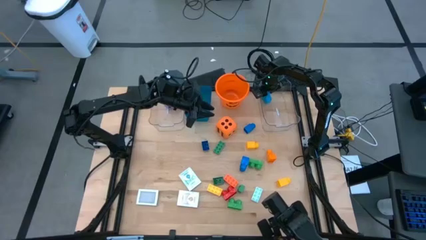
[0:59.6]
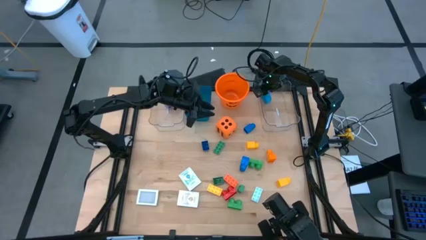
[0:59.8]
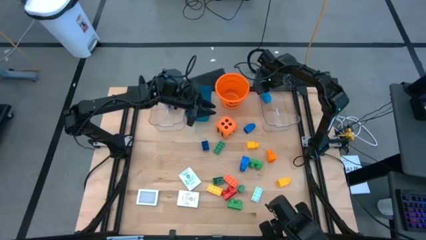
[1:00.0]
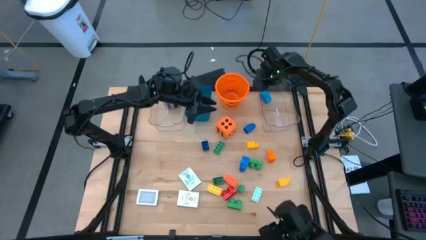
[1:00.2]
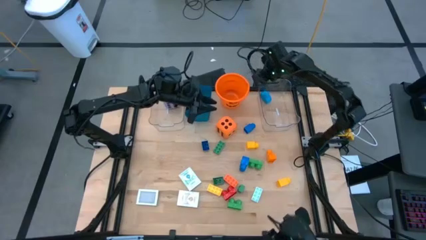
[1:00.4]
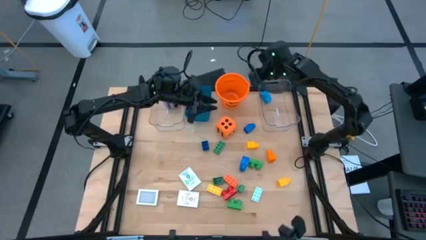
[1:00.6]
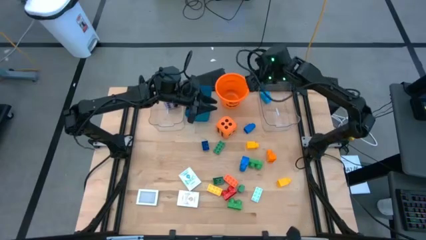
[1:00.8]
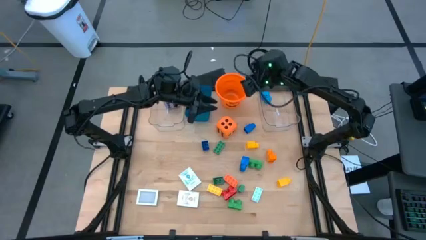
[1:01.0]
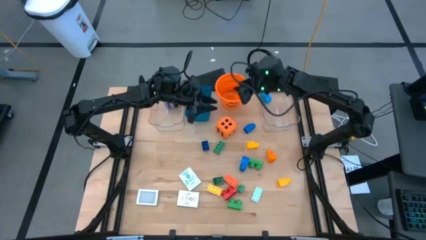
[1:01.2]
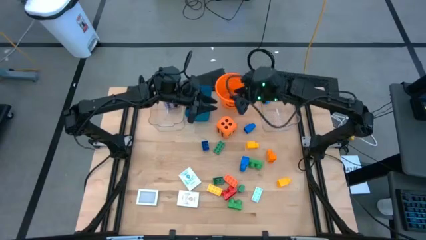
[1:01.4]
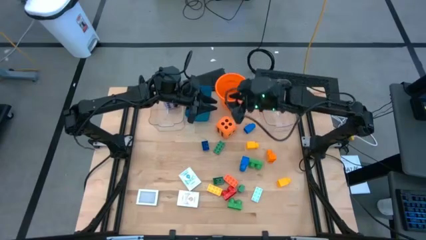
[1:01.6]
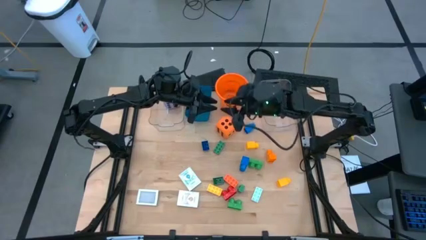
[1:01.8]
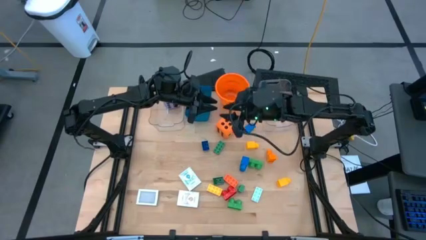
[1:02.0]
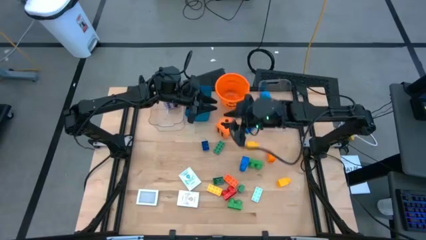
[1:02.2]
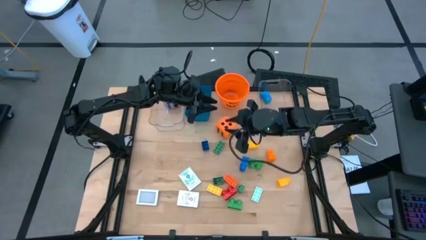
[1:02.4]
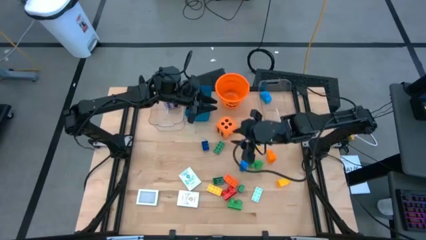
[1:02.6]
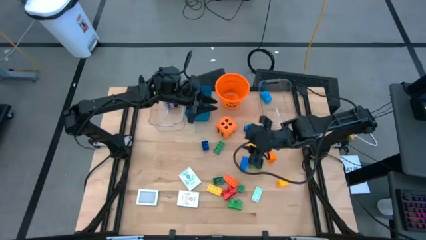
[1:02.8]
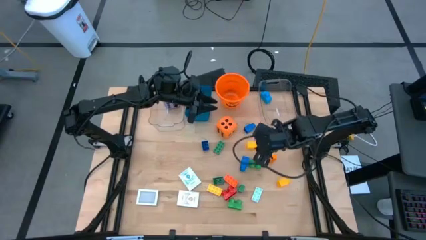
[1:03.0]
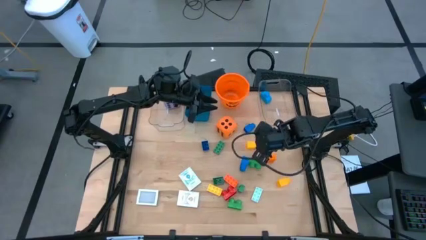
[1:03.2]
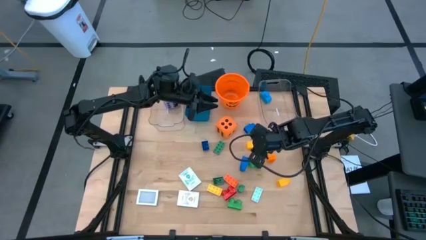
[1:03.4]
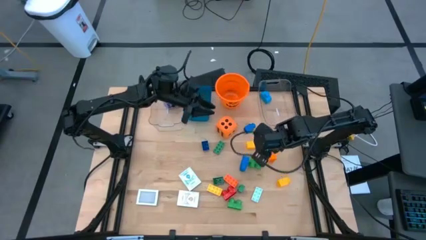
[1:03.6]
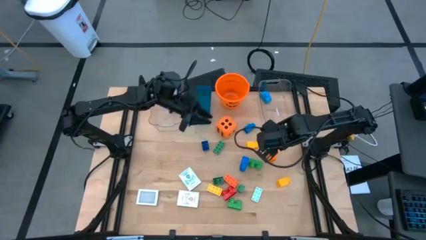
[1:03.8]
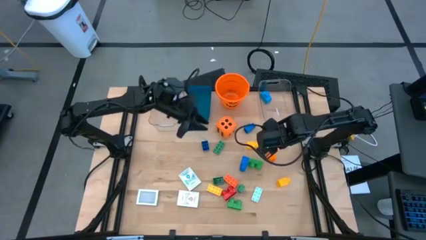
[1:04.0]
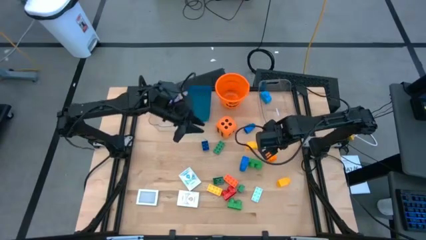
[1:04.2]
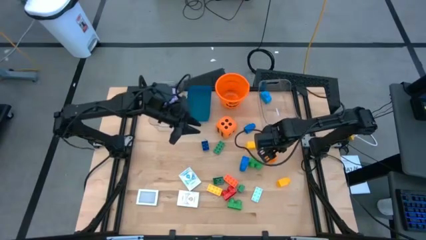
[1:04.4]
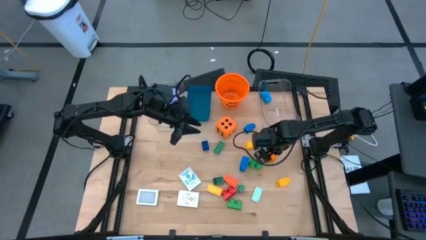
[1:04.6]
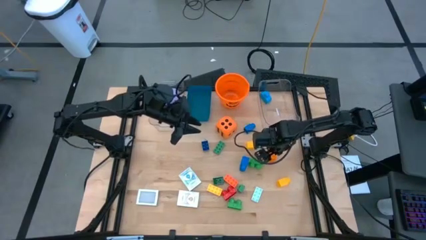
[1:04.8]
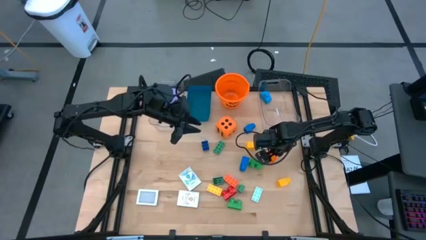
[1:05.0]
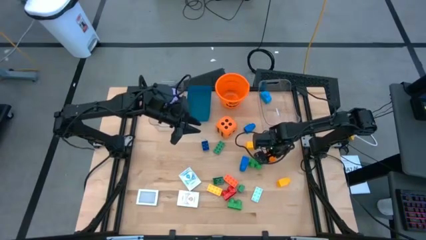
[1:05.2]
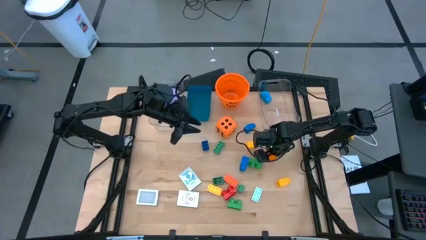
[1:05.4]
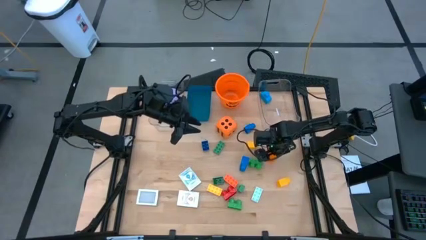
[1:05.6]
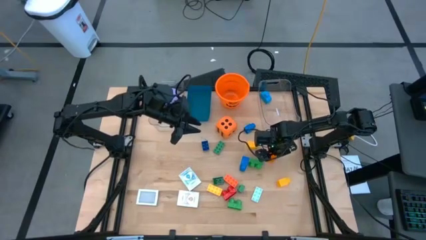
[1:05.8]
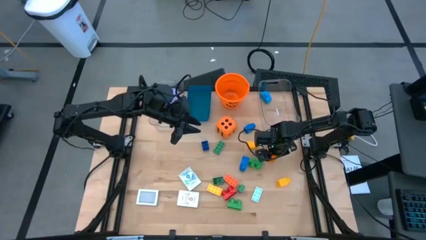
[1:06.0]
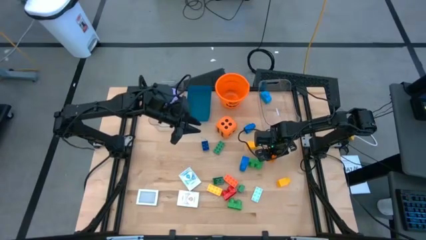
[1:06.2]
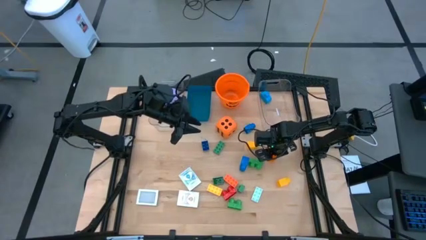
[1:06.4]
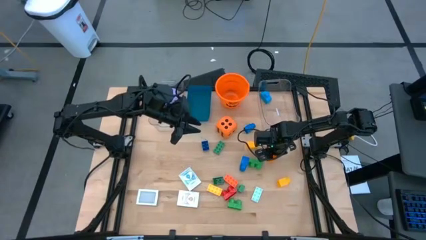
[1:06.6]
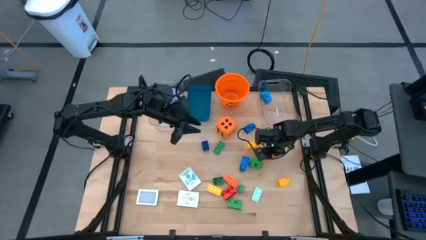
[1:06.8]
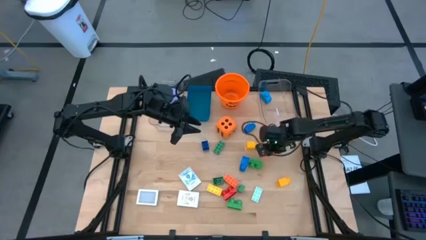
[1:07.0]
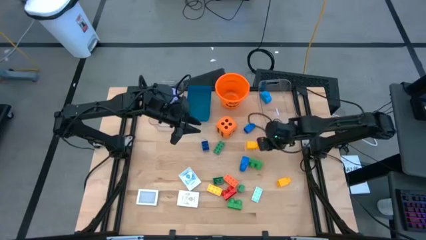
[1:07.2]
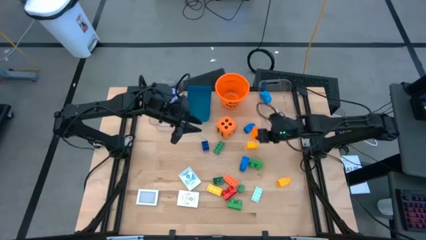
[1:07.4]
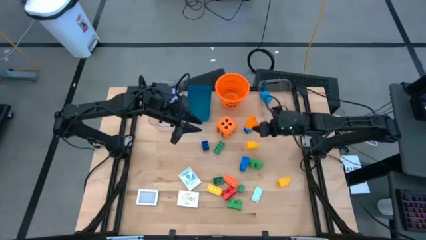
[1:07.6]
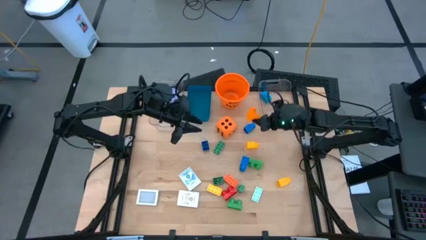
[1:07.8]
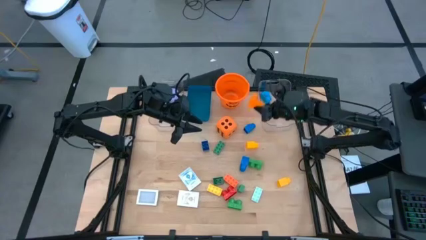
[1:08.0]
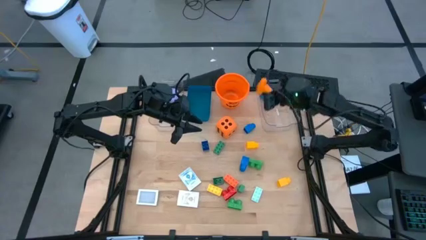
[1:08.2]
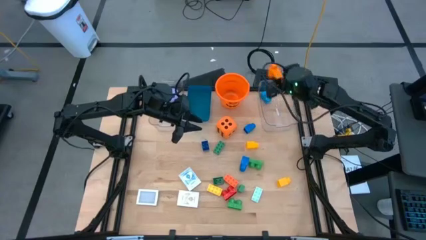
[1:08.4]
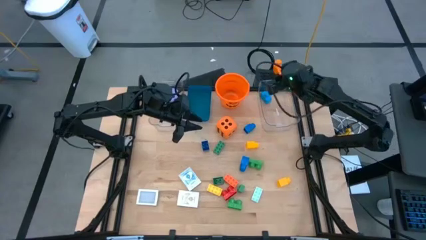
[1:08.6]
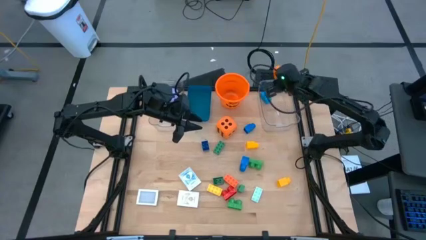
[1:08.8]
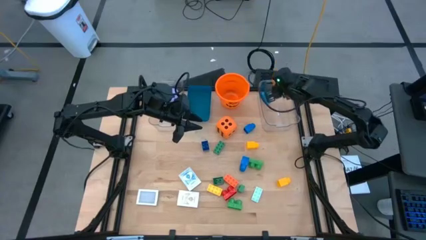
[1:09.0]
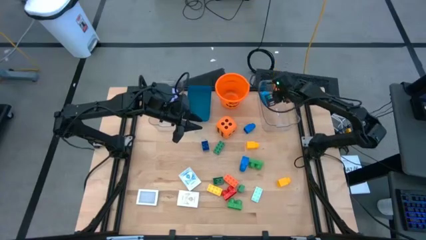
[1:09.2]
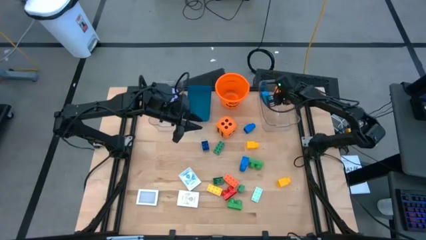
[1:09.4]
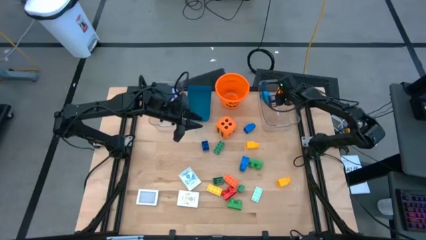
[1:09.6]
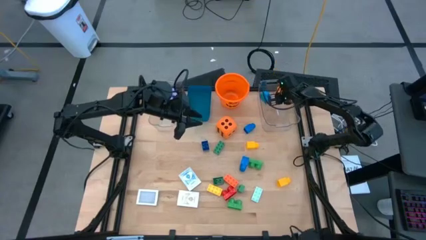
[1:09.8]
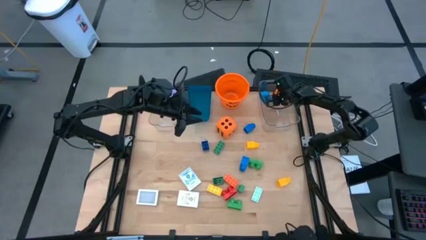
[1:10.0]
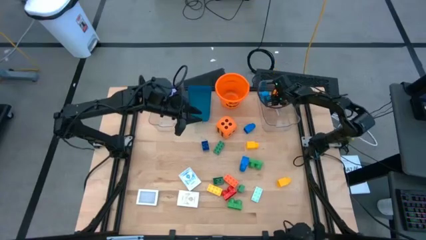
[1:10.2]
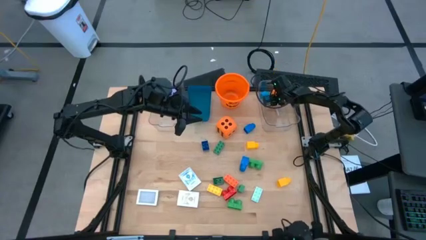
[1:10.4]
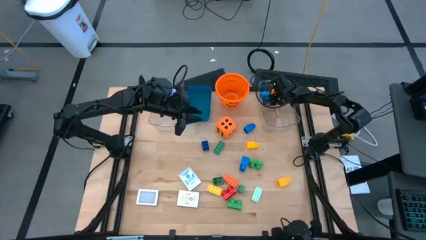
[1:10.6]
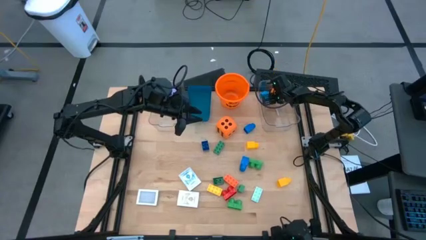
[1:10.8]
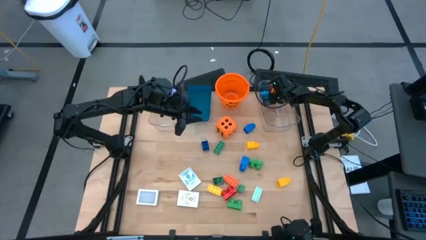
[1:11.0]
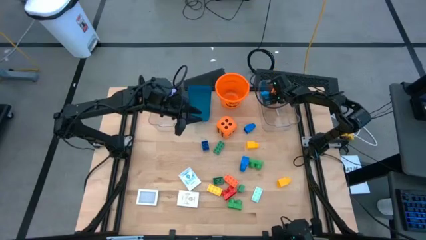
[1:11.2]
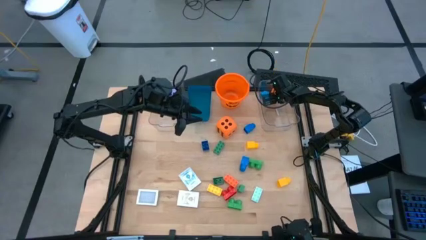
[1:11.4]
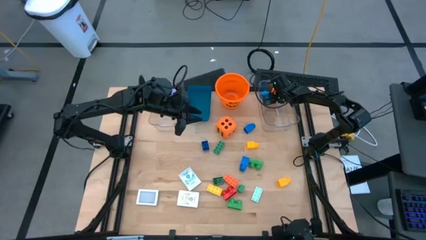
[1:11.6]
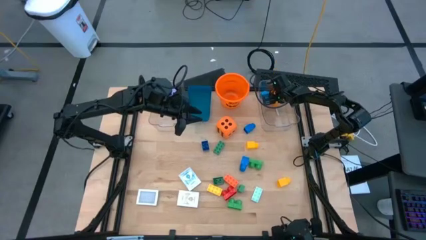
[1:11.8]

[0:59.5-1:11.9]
Task: Pick & Place Toys
Put the orange game piece into the right transparent bin

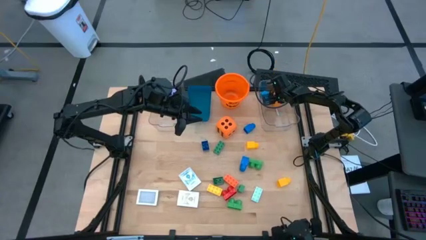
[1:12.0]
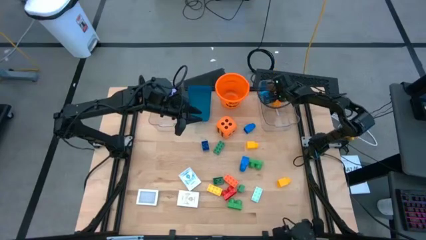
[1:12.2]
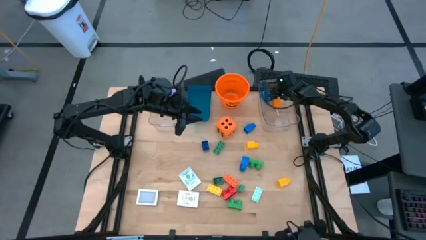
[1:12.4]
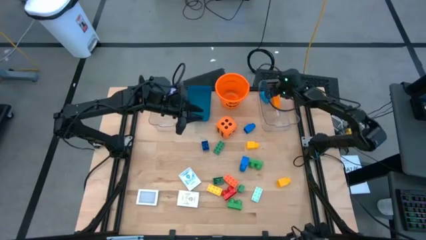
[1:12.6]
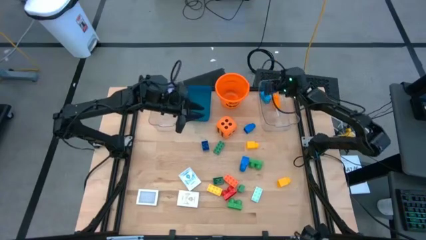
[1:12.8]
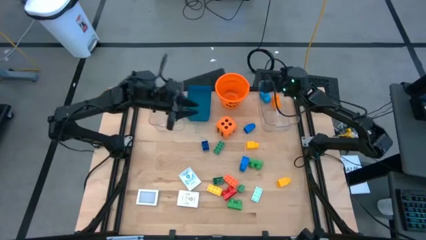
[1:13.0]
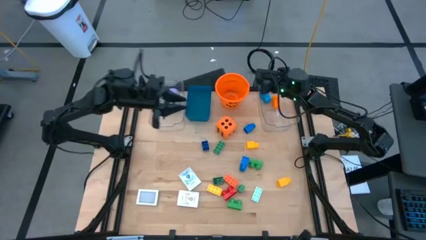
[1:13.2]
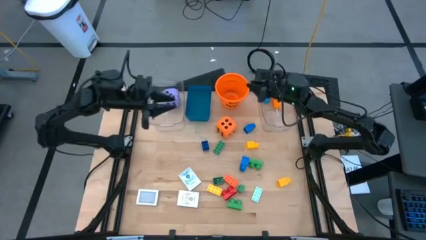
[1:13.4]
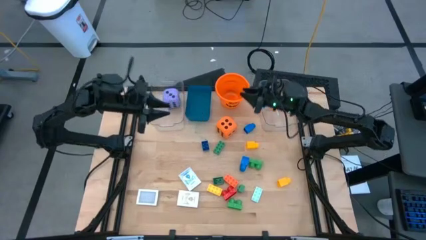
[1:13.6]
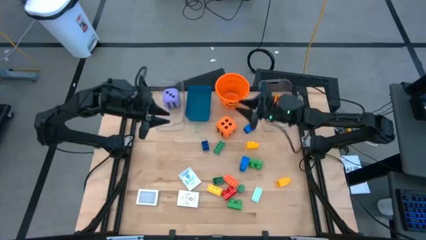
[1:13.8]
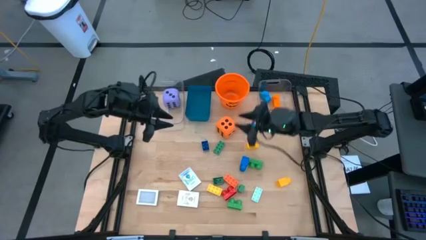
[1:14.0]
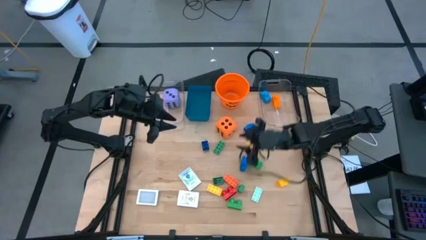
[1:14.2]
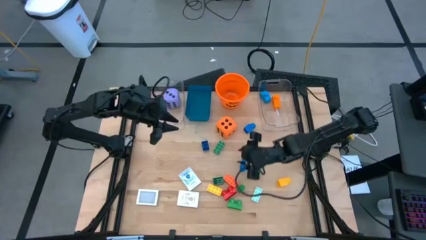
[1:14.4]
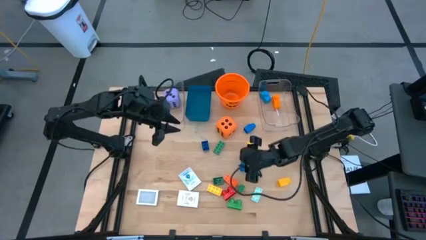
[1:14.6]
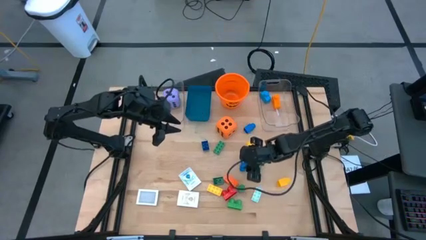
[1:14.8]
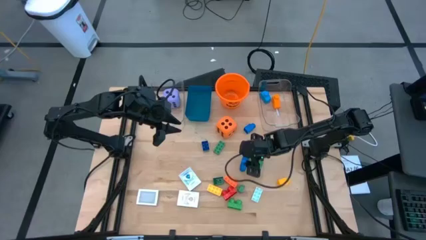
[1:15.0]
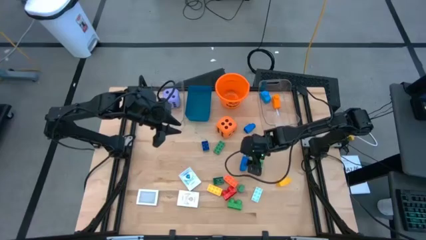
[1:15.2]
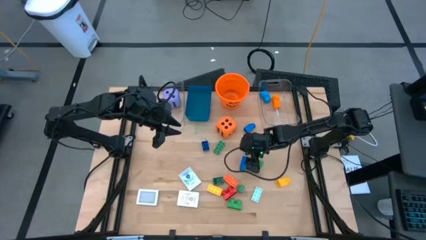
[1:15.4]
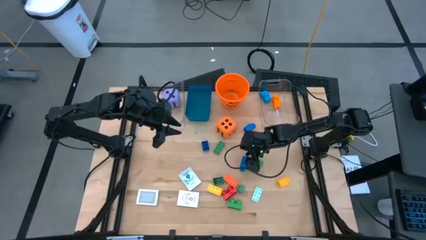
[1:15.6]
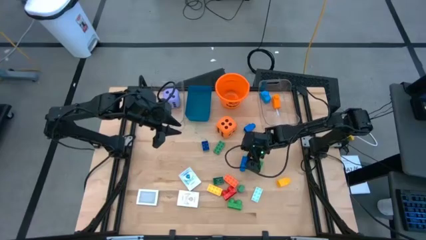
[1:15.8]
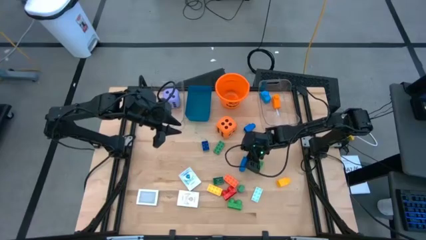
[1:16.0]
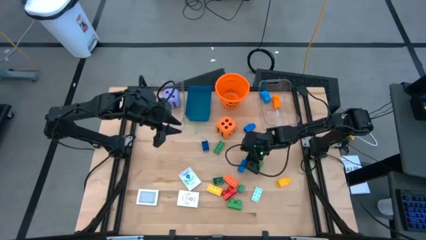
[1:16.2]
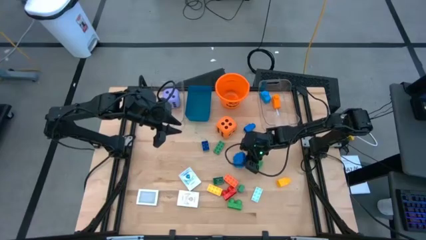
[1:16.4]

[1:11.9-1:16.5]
Put the blue game piece into the right transparent bin
